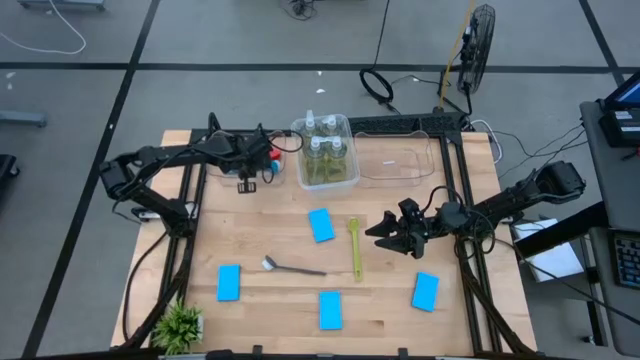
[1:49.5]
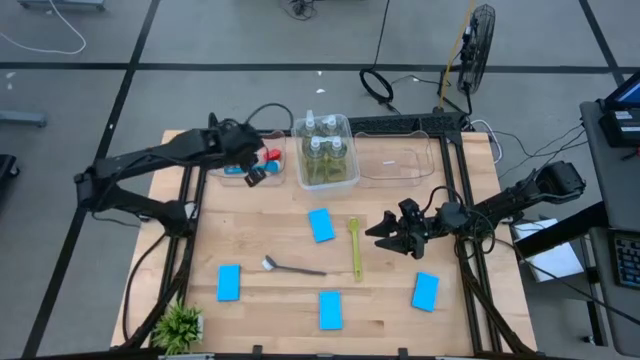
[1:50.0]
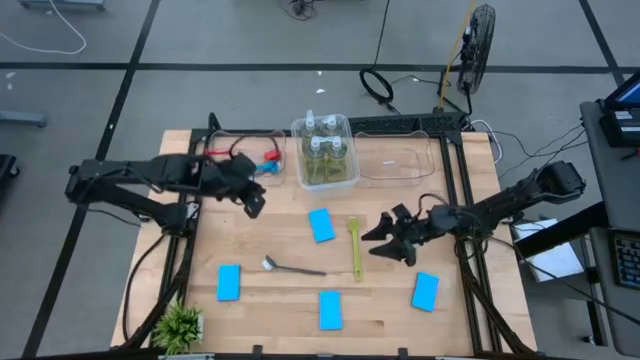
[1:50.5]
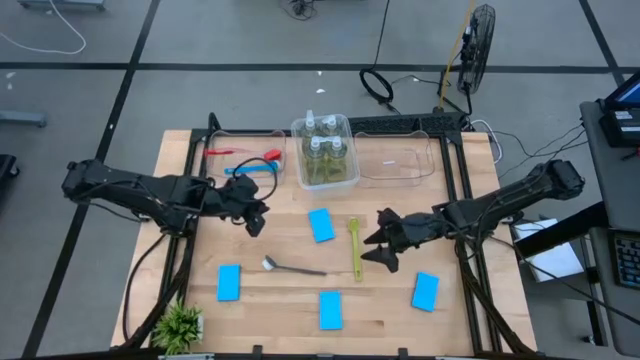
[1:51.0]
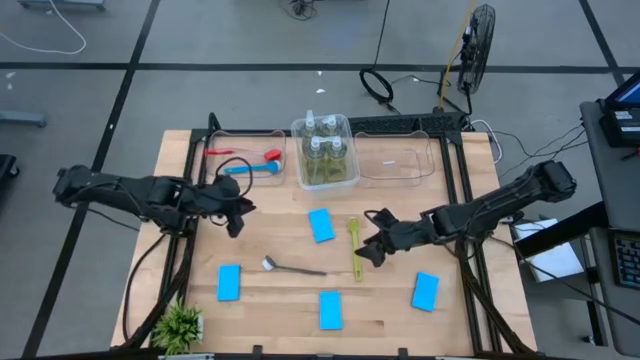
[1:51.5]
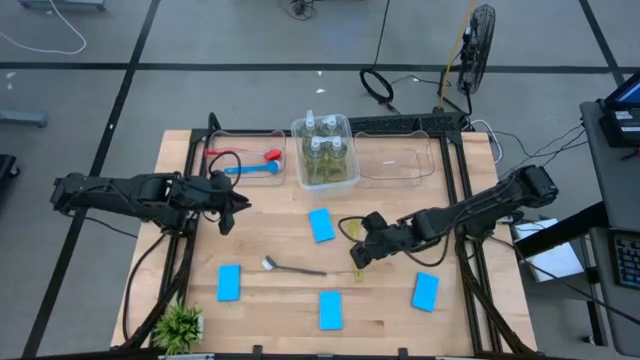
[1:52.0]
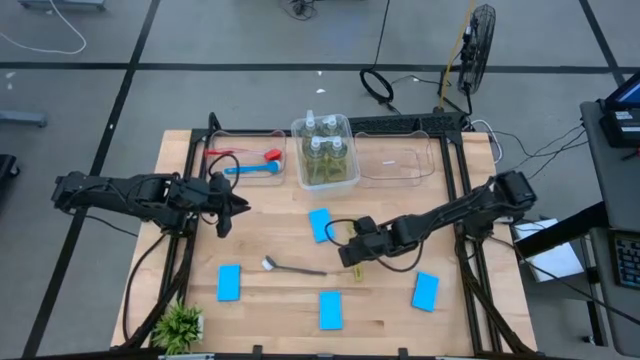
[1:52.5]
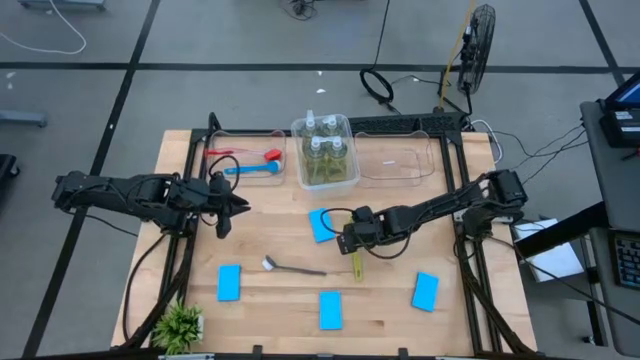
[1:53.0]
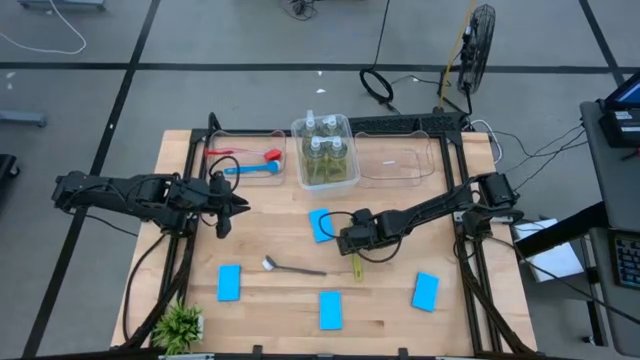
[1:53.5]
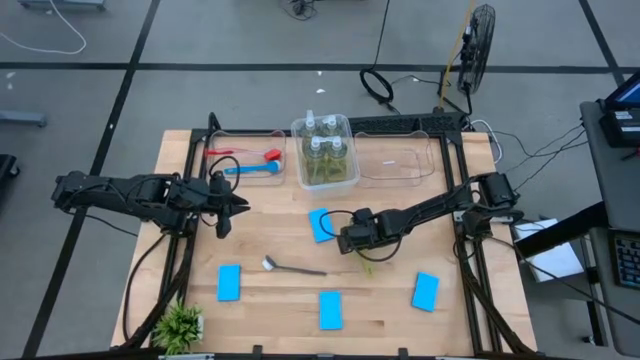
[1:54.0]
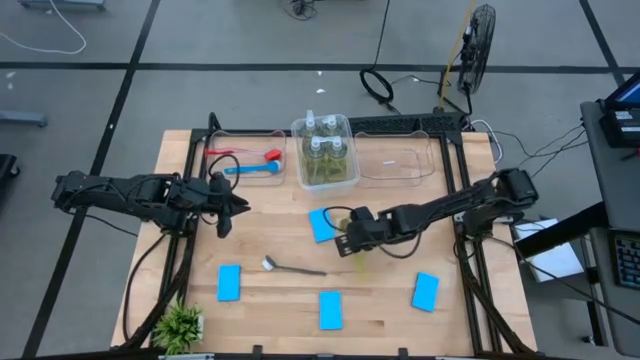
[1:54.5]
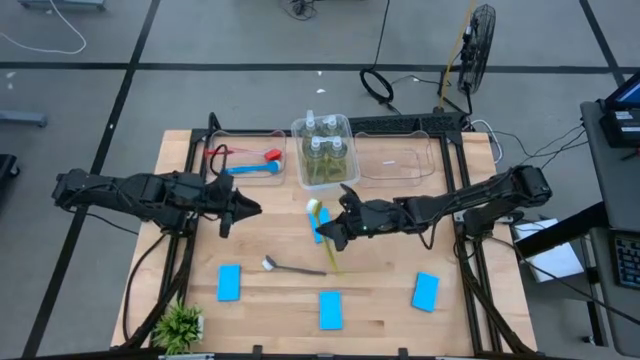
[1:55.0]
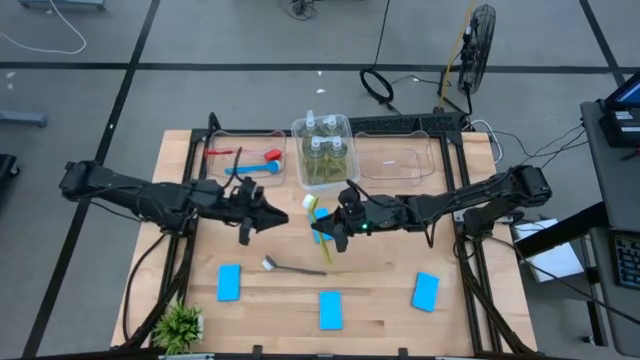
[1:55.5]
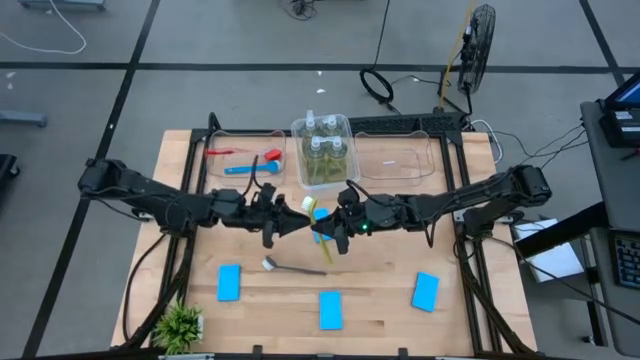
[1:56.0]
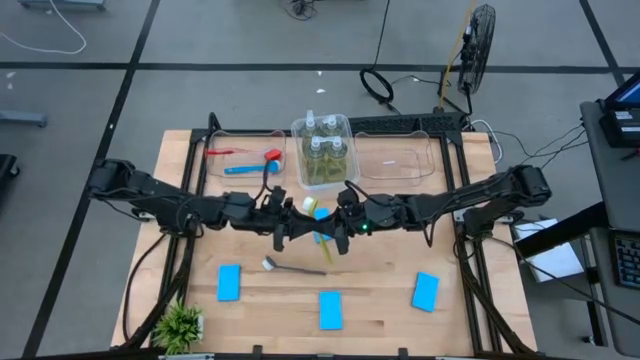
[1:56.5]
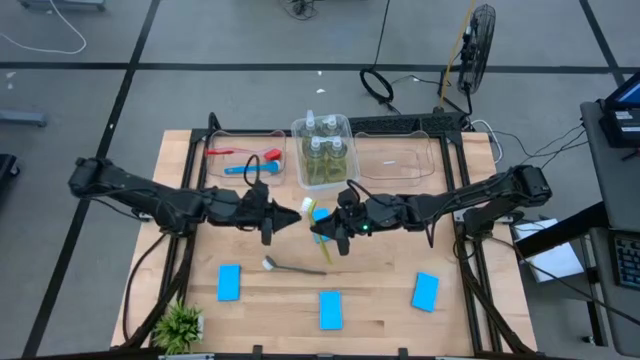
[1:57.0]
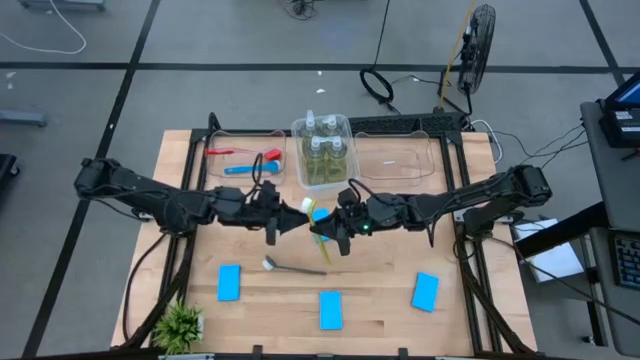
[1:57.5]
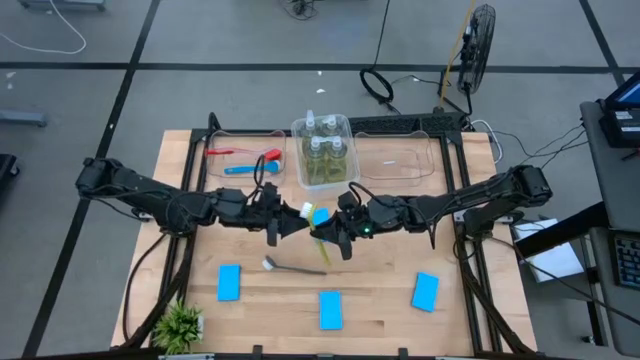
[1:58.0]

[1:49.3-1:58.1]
Task: Pick & Place Kitchen Sink Supplies
Put the yellow and green dish brush into the left transparent bin

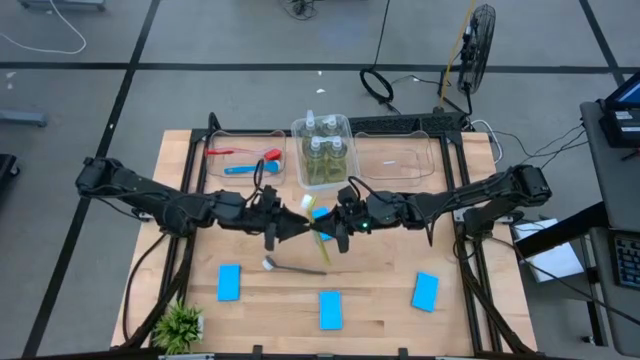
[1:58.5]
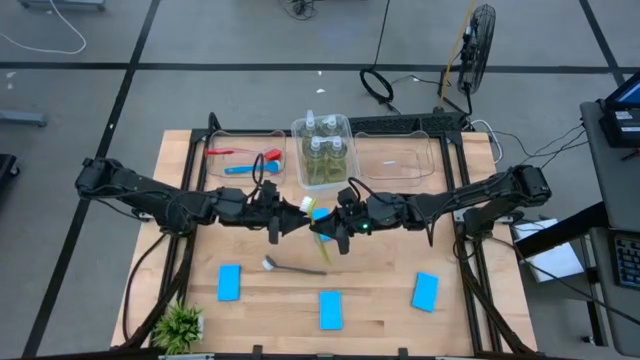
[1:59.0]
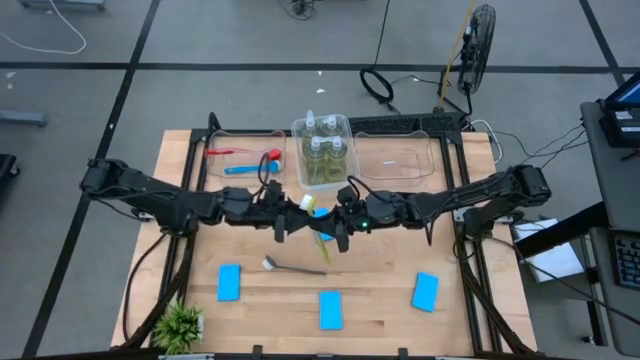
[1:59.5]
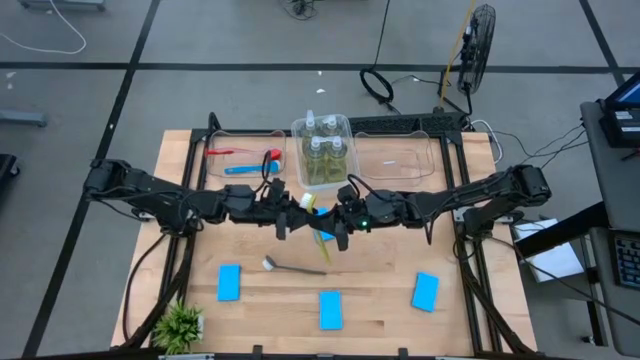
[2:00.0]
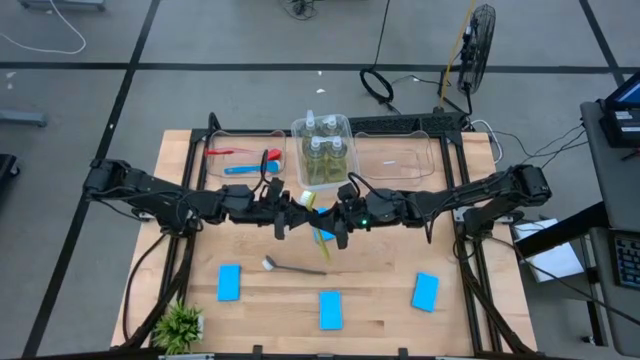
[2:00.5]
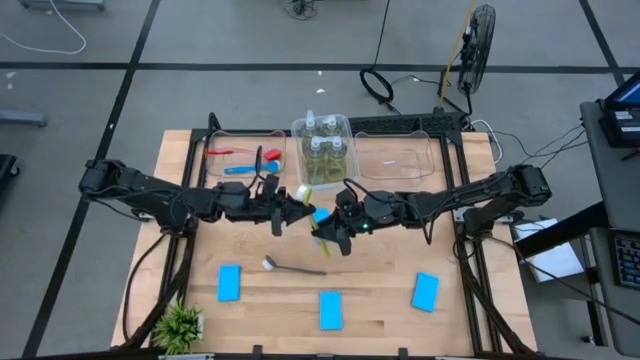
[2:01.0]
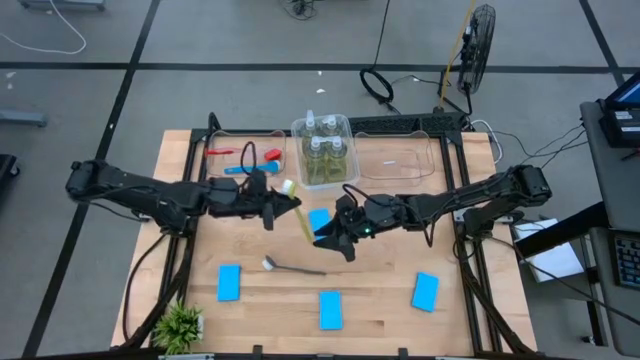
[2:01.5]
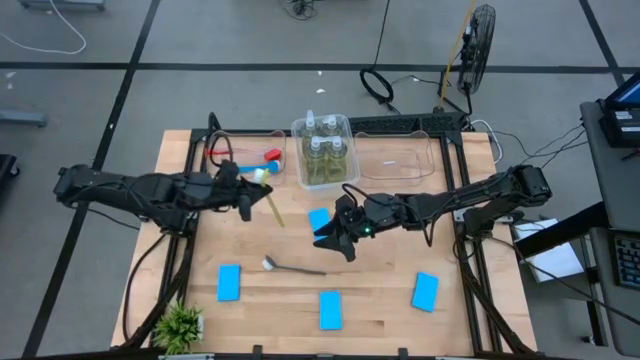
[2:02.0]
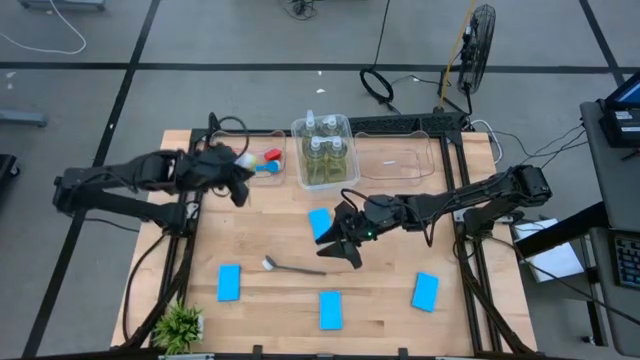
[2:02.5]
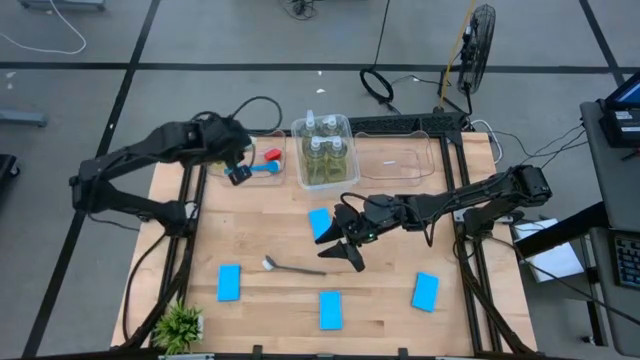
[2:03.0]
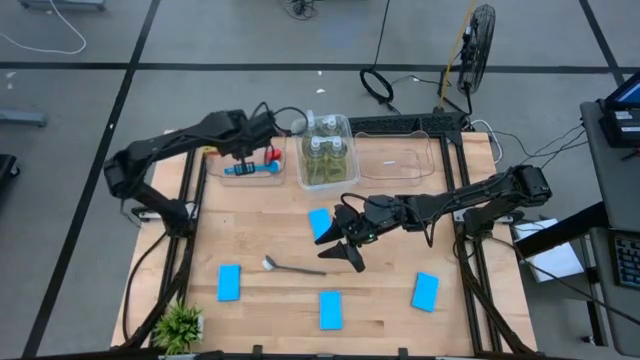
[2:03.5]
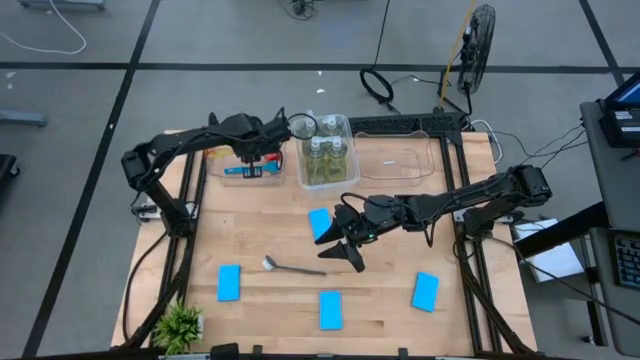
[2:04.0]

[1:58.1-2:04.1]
Put the yellow and green dish brush into the left transparent bin

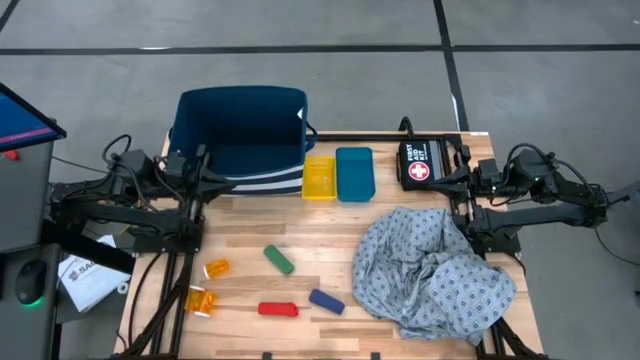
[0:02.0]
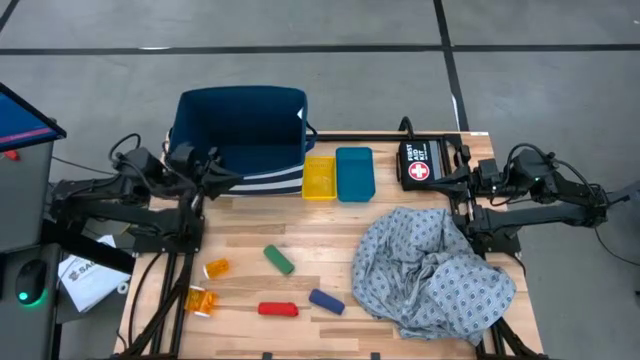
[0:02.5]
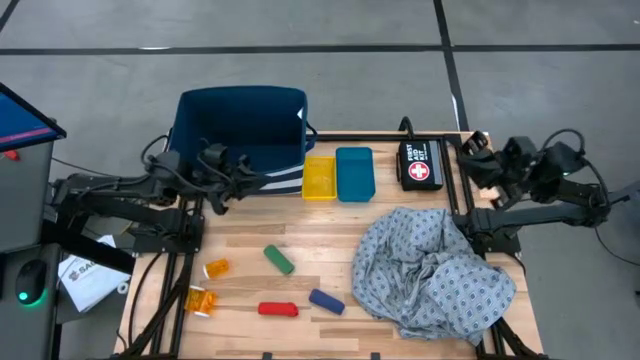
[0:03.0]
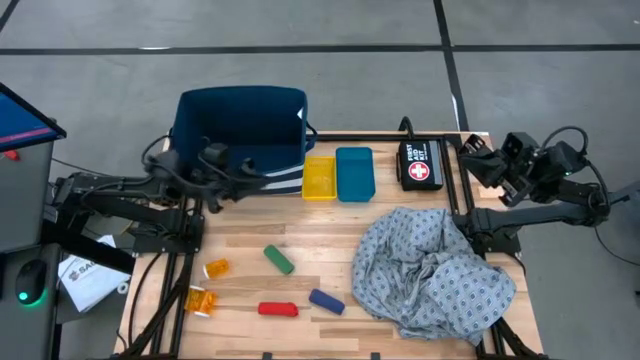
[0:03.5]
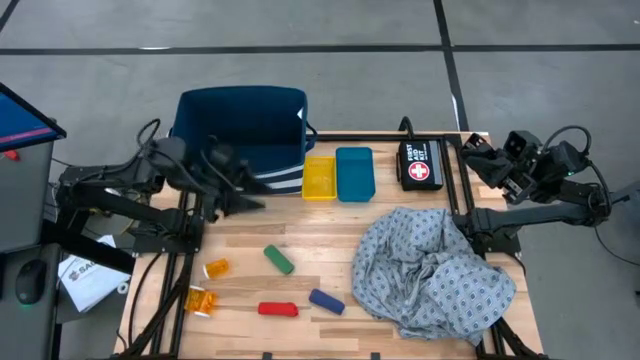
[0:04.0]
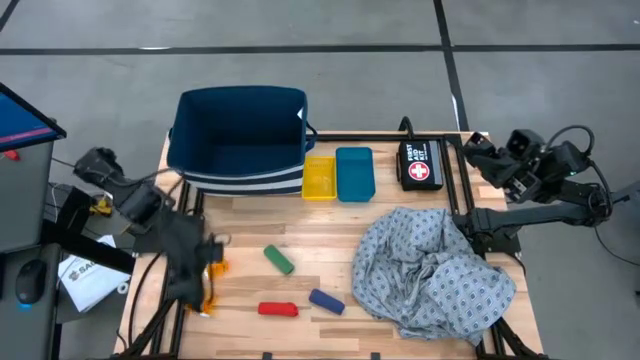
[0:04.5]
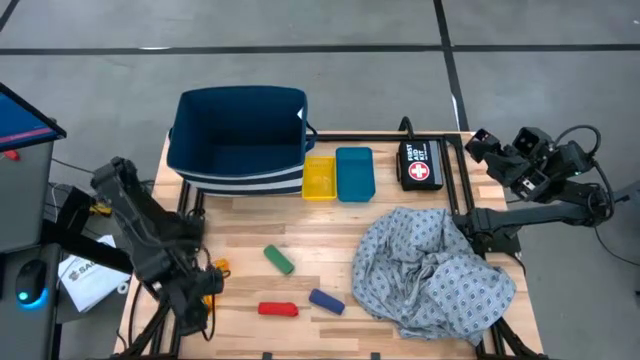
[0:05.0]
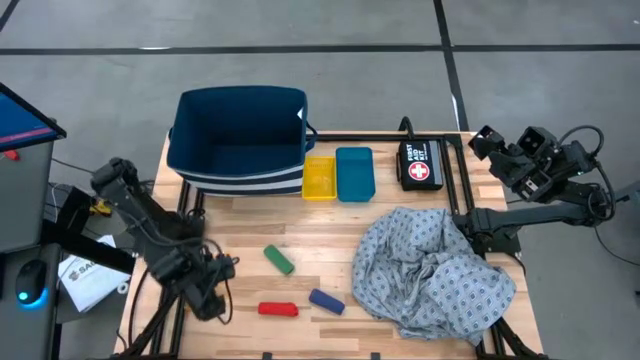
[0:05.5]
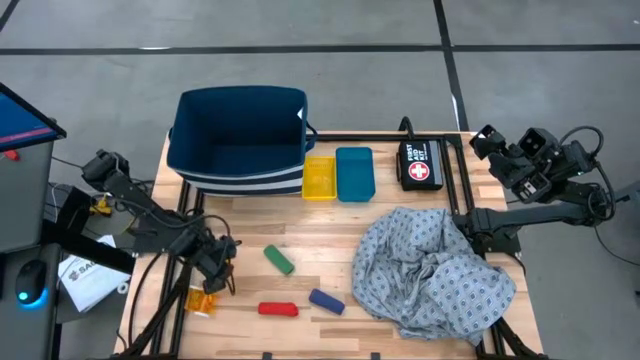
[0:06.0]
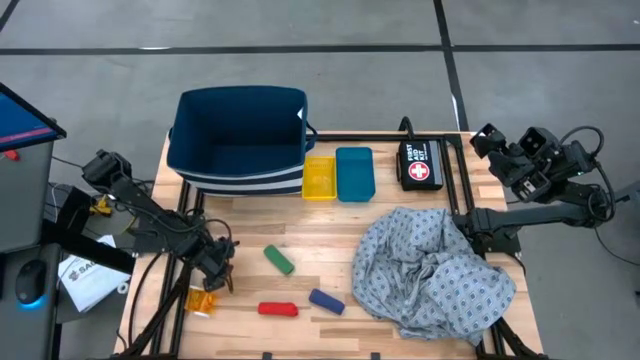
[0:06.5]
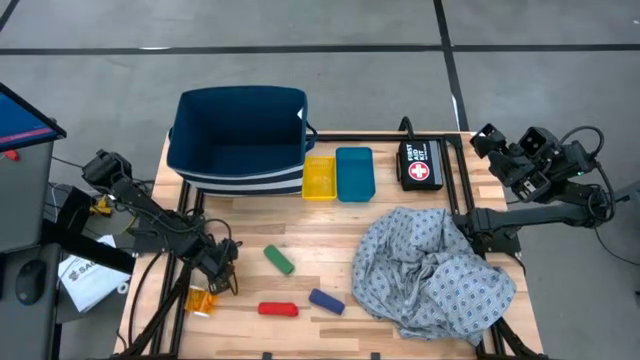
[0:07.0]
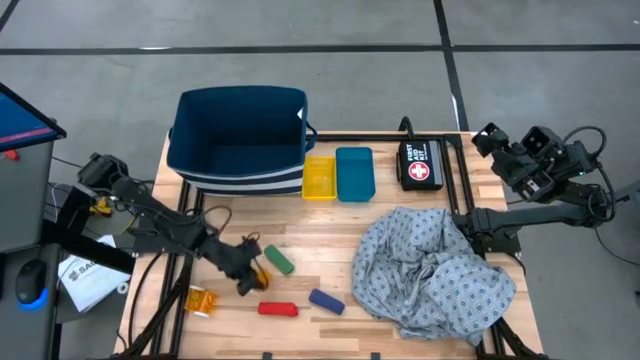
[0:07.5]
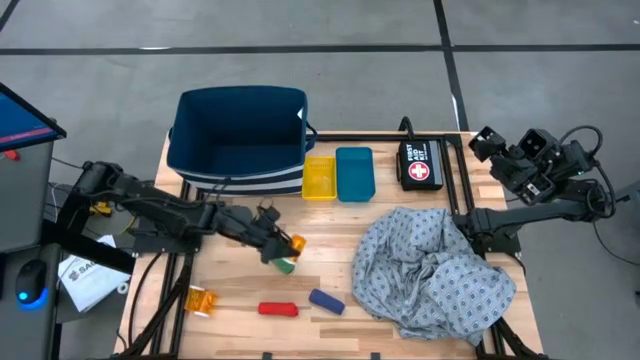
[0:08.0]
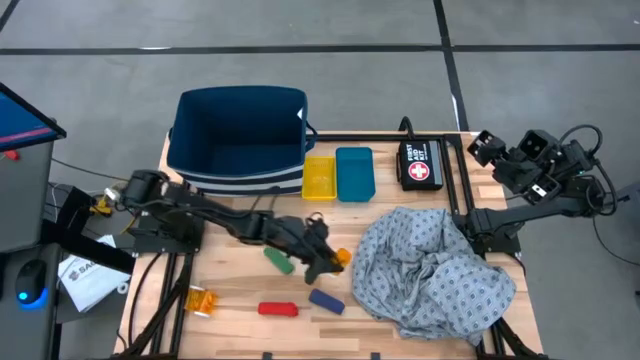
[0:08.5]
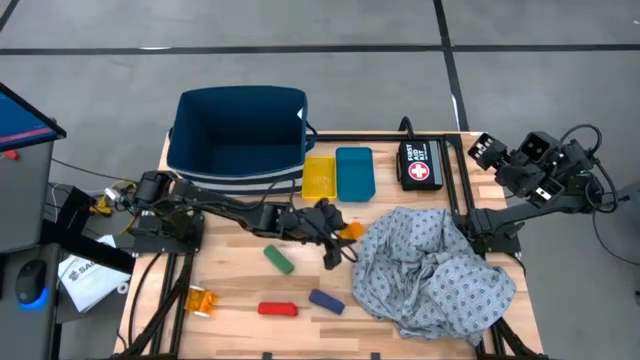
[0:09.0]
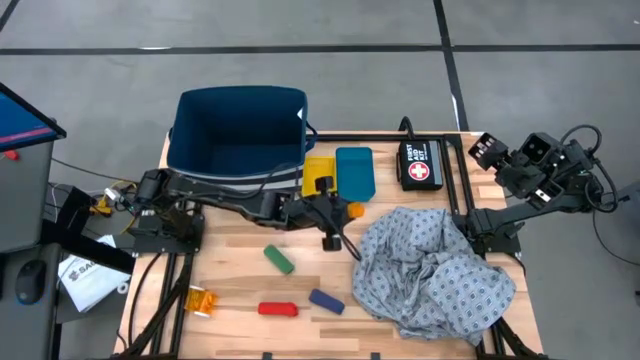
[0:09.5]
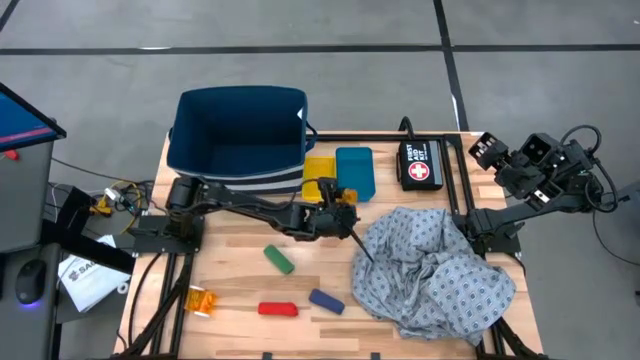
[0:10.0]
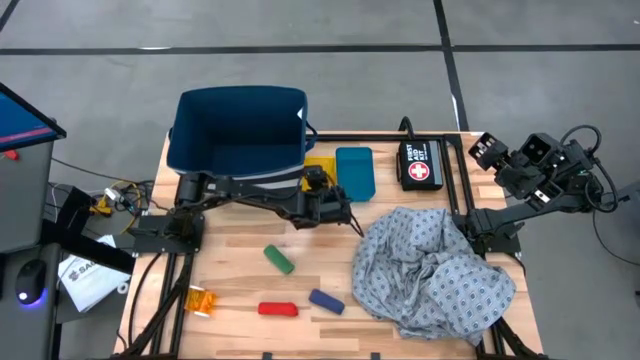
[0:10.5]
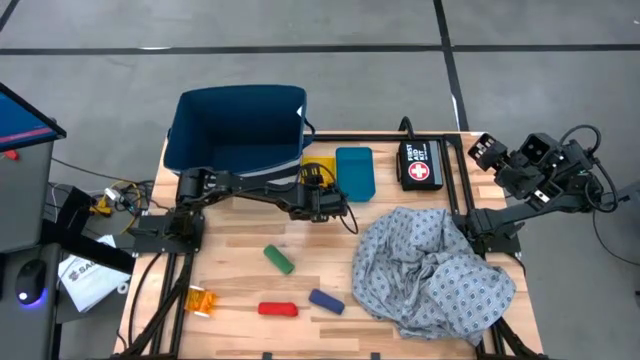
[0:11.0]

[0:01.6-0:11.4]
Task: Pick & place medical supplies in basket/bin
Put the top orange pill bottle into the yellow basket
